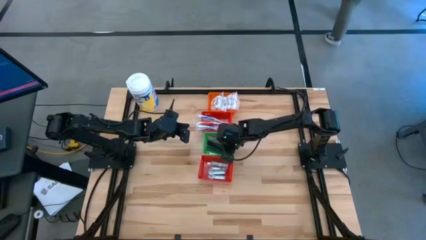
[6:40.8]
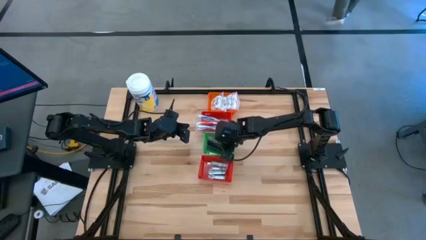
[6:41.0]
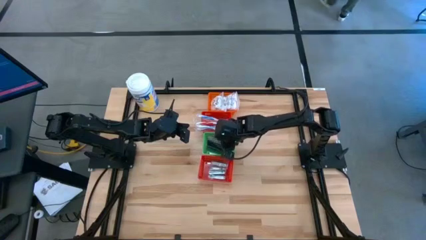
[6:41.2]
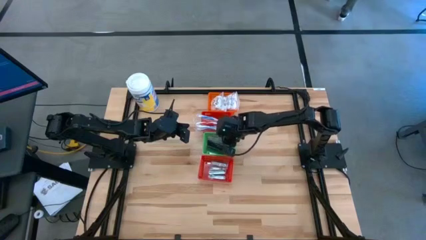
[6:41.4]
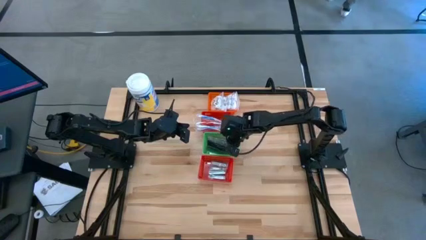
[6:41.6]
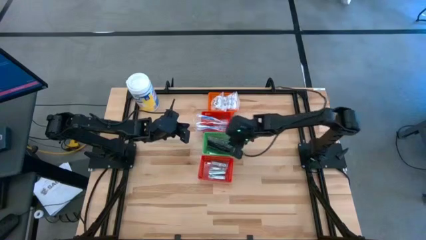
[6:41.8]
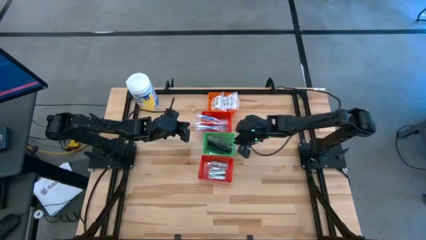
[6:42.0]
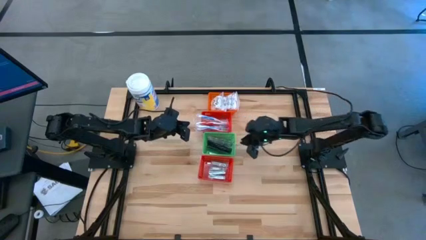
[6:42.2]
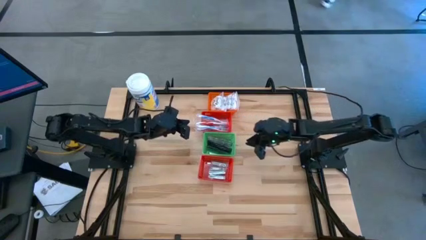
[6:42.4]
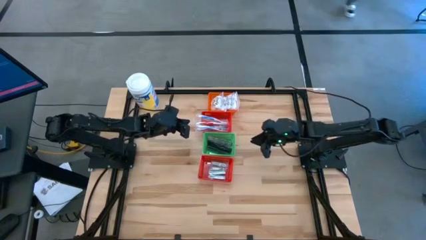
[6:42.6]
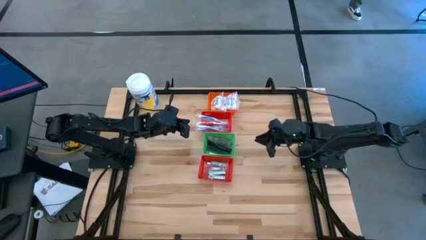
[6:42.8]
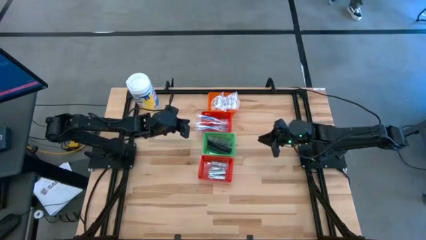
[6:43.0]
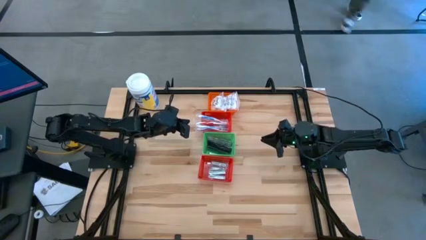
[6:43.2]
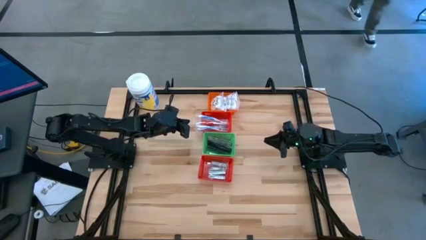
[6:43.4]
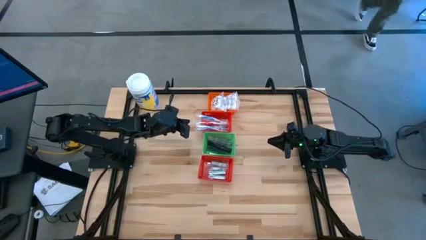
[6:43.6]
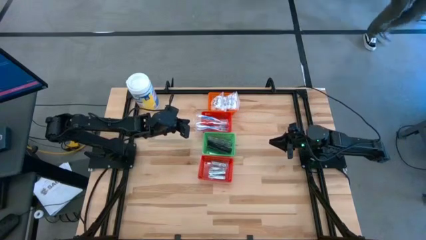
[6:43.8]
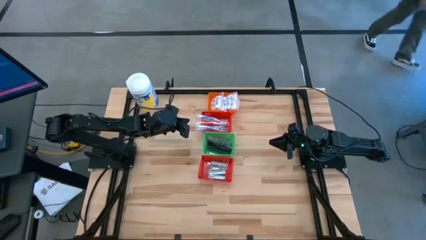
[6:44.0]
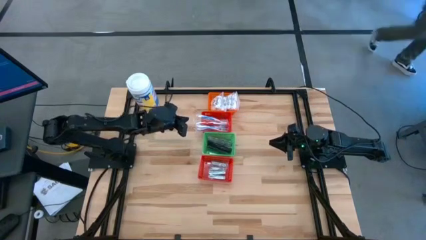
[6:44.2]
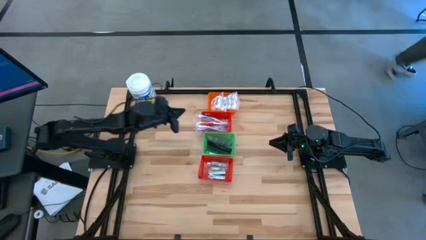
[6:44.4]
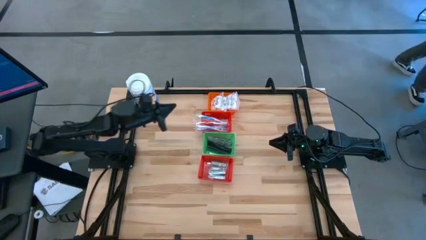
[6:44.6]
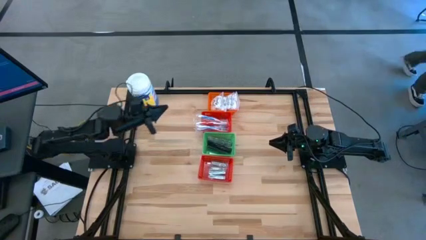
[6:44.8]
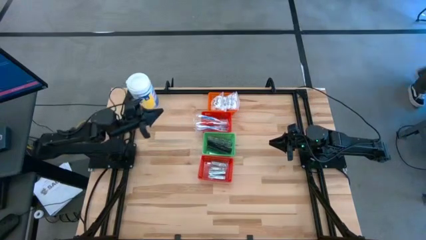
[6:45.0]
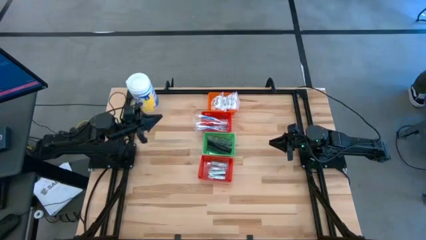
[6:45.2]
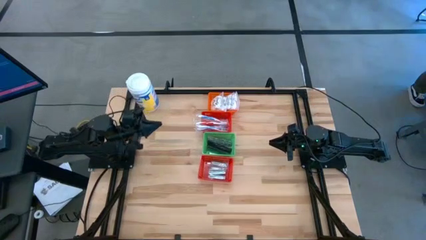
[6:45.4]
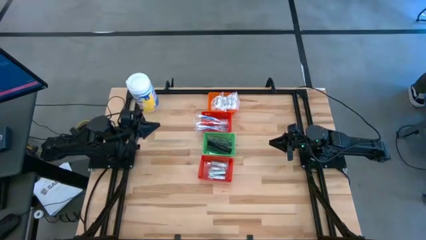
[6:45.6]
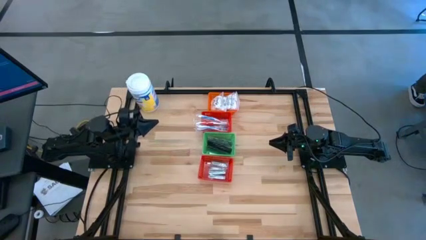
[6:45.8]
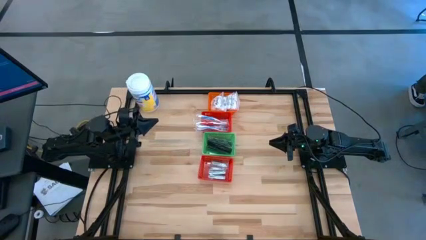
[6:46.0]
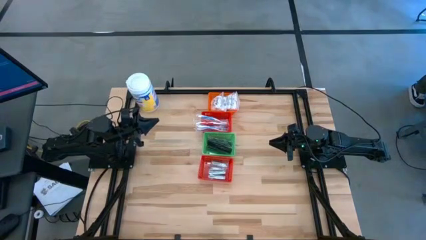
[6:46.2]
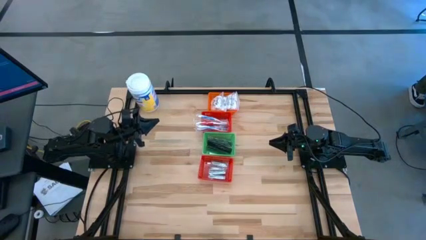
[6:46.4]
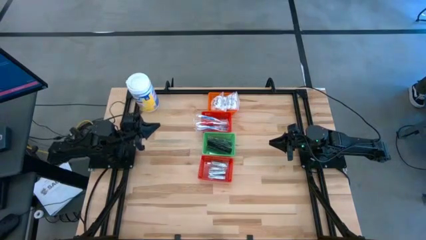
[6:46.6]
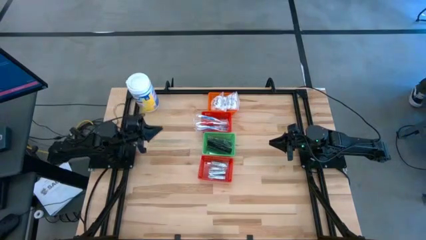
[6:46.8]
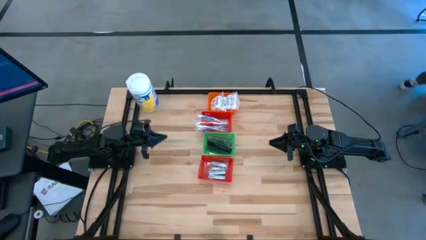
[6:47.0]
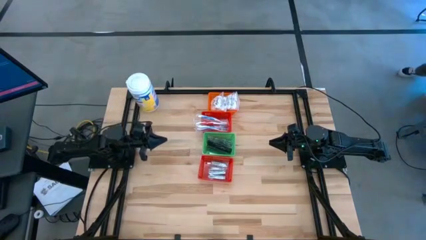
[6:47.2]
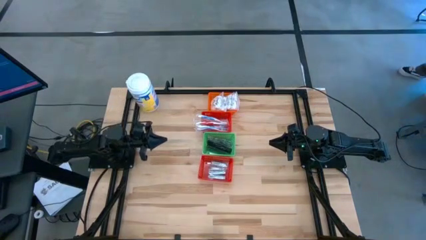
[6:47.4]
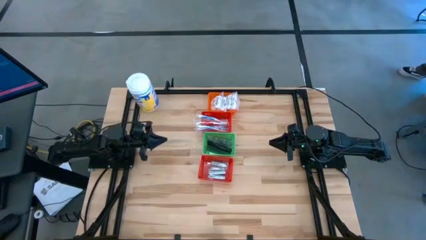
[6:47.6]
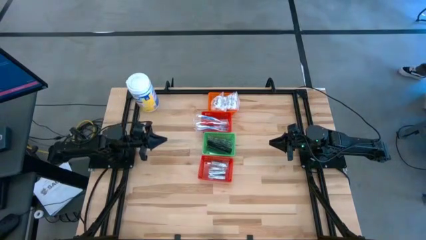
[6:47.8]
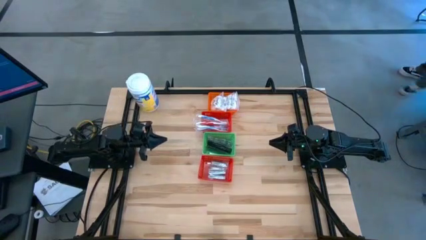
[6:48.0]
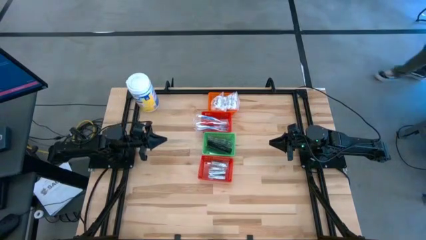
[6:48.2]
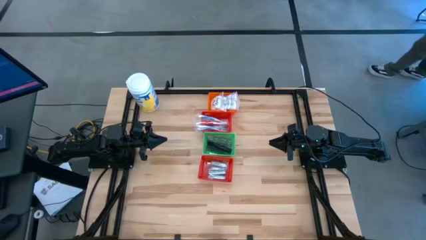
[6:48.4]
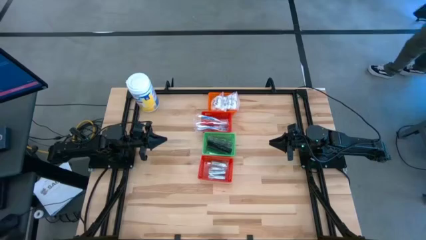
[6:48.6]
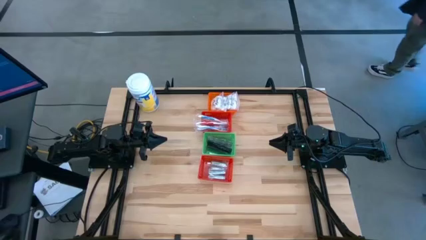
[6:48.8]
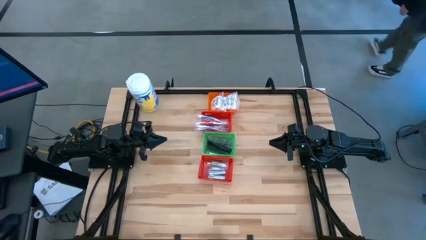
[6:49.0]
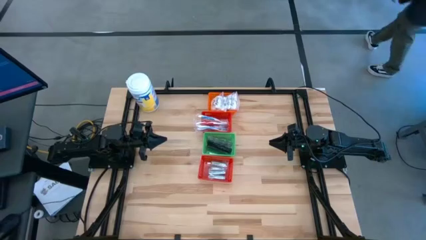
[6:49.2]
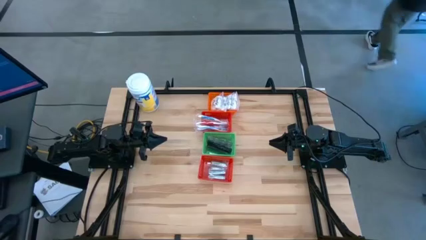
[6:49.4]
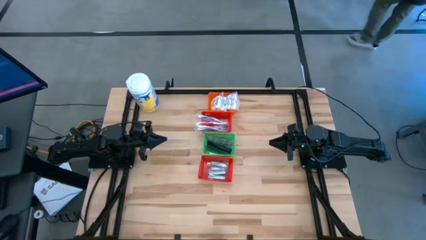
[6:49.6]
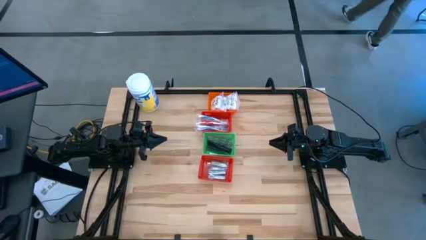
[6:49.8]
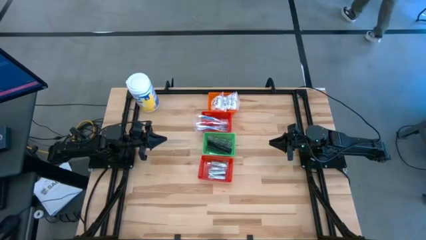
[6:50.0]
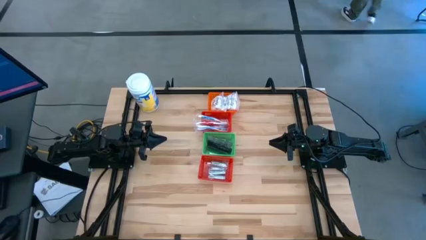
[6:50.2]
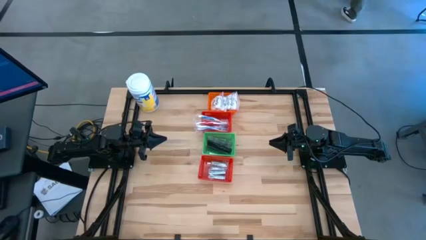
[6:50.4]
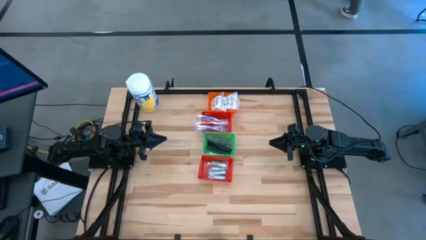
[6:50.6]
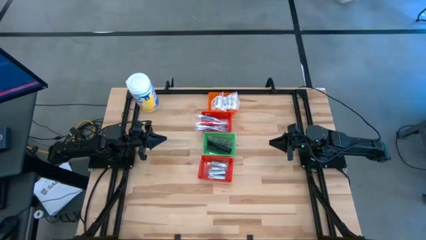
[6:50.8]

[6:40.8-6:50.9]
Task: Pick & Place Travel size toiletries
Return to Home Position

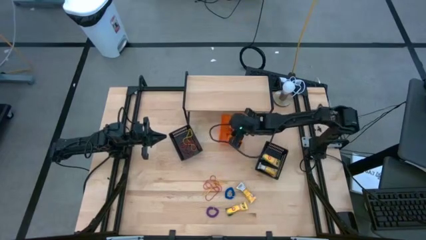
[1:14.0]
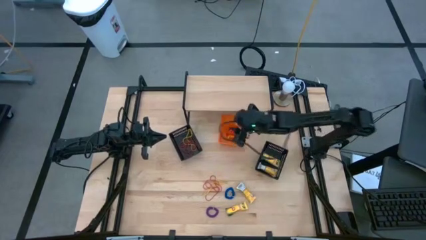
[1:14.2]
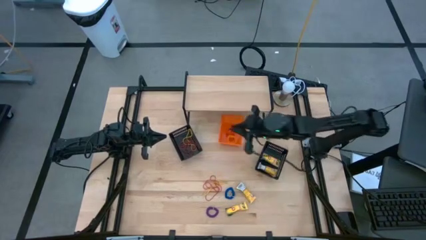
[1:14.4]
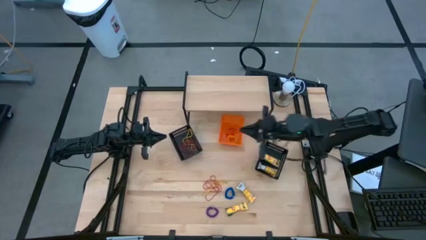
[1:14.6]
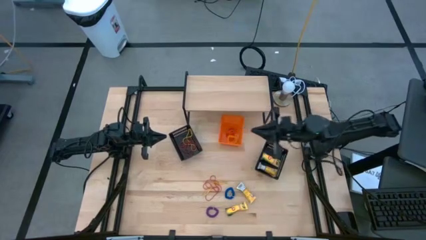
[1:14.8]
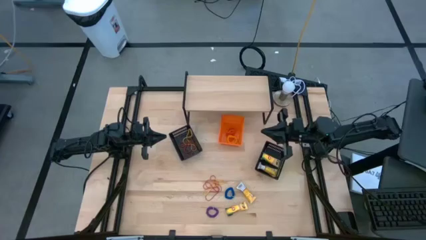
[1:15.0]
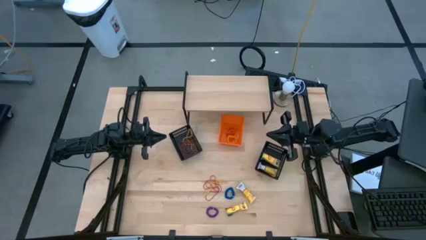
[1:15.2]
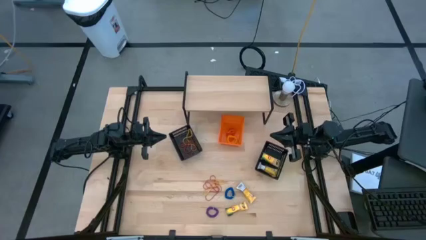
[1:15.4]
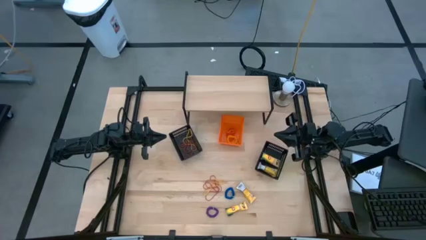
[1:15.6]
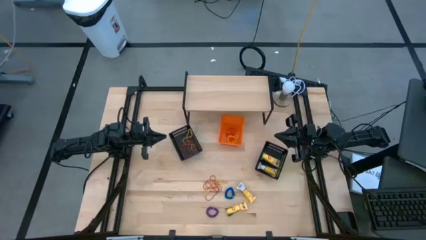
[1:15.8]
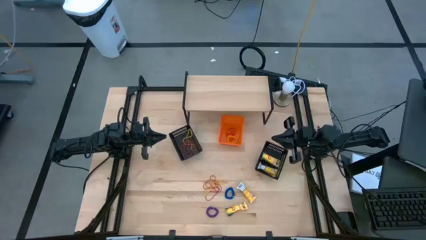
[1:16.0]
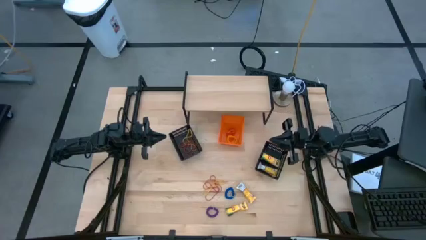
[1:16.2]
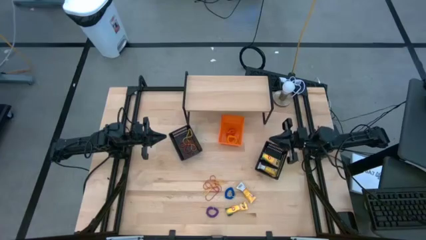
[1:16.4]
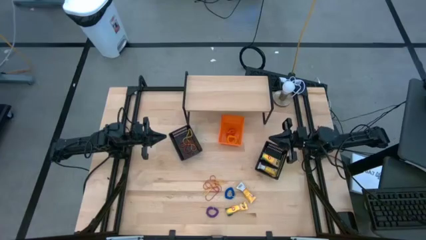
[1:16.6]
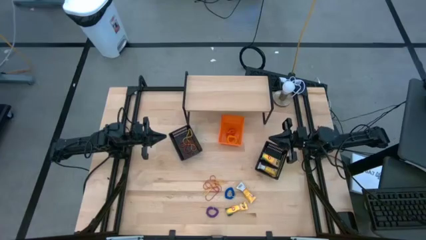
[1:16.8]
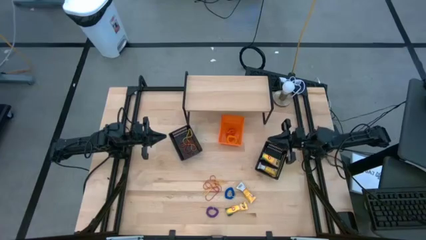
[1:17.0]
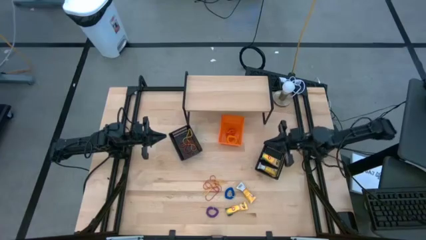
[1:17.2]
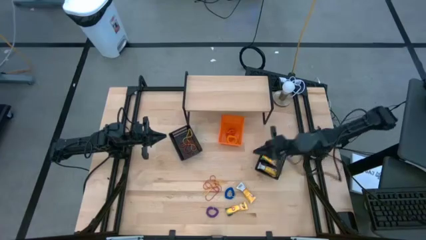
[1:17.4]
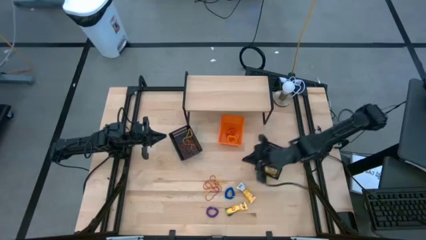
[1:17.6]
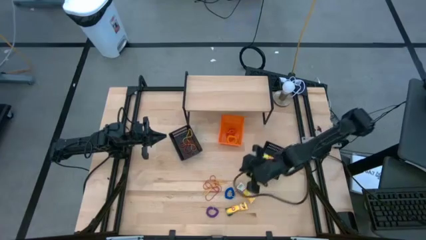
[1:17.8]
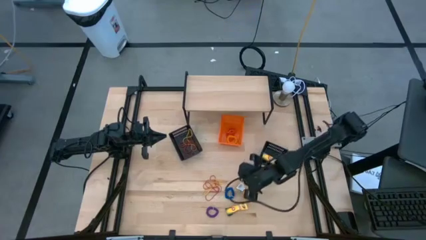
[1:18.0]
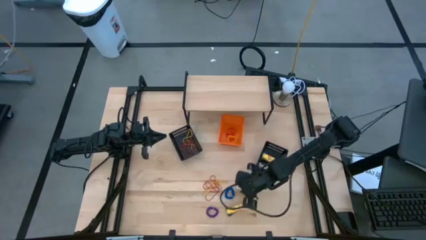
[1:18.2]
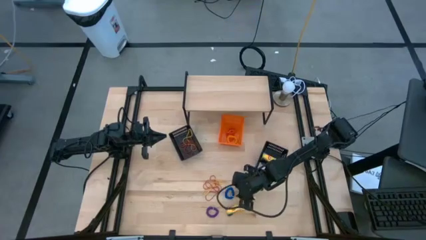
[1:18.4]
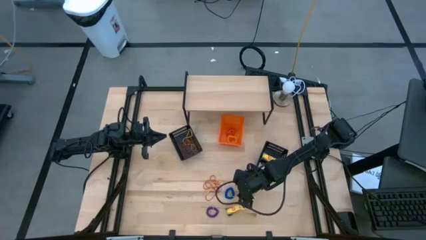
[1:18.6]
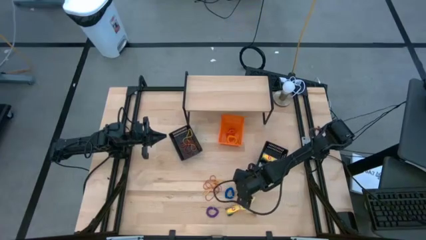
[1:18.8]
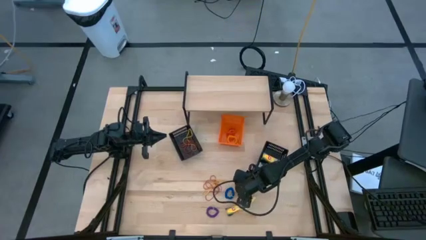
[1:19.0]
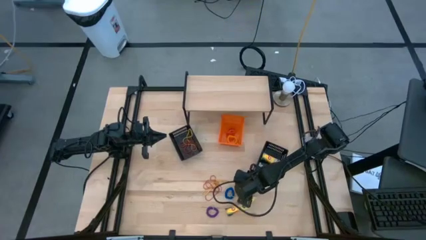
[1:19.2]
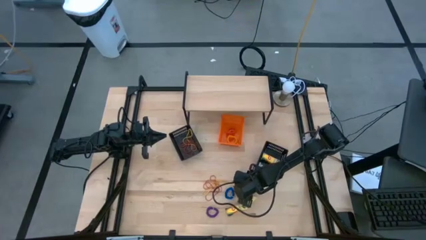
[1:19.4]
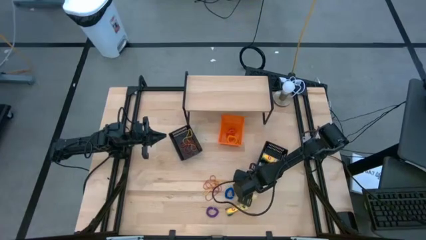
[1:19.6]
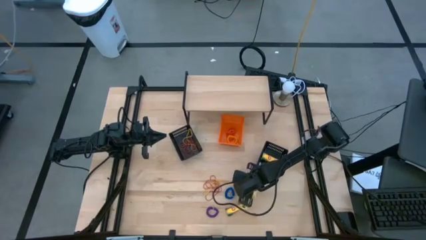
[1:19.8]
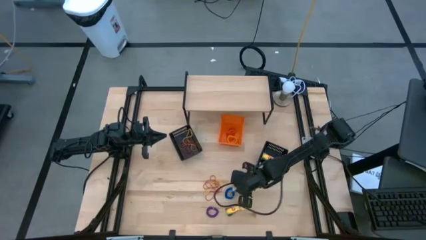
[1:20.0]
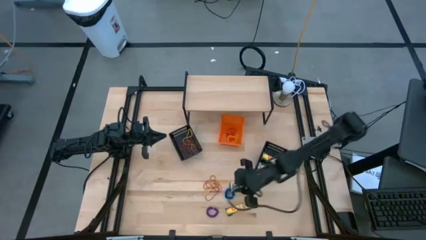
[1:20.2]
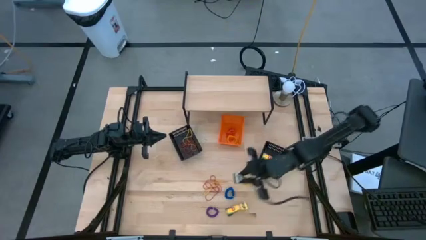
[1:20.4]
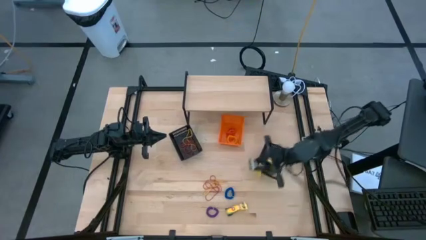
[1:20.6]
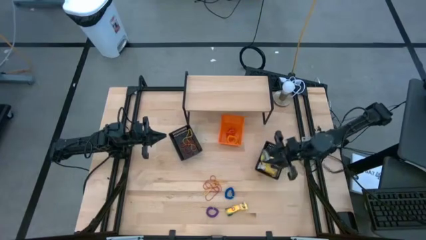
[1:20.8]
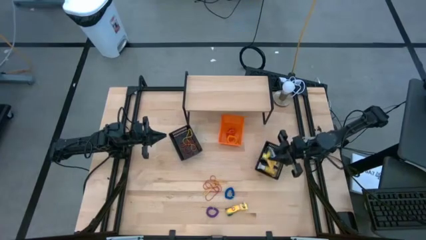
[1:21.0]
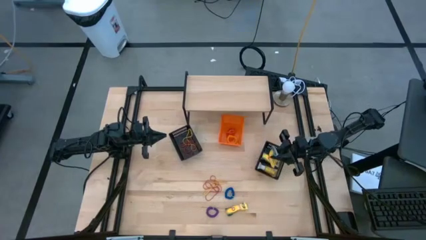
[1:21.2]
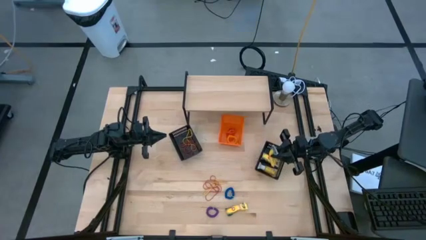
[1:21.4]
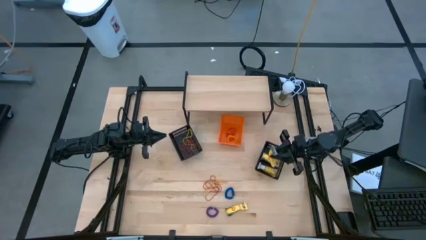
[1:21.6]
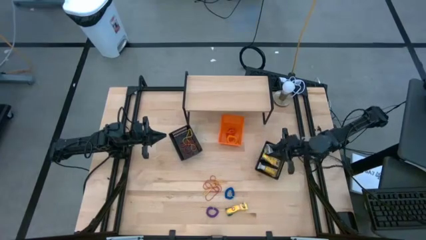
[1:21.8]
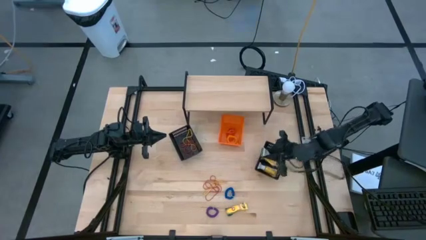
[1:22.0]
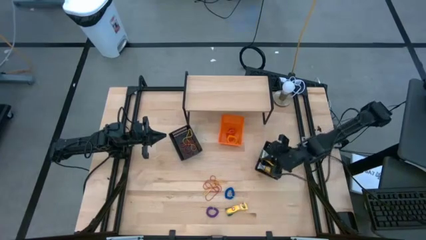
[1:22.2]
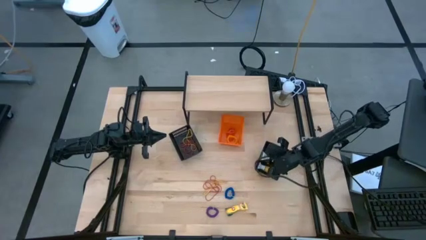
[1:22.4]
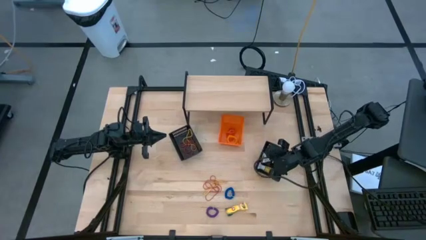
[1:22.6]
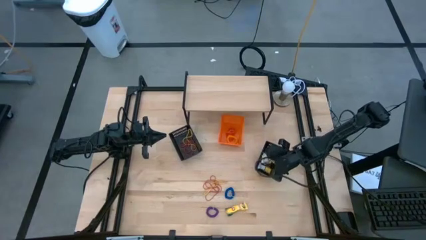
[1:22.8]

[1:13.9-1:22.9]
Task: Pick & Place Office Desk Supplies
Put the crayon box into the right black bin
